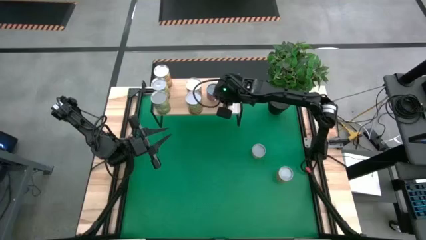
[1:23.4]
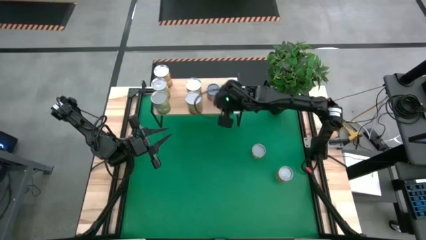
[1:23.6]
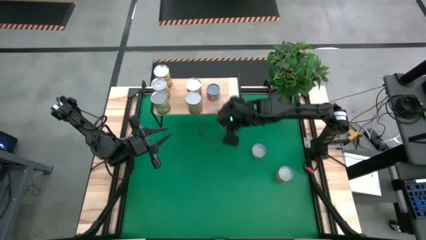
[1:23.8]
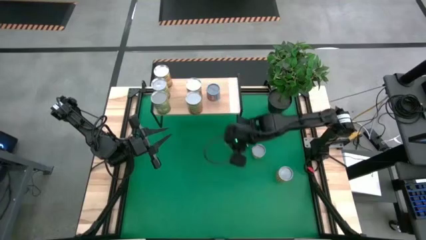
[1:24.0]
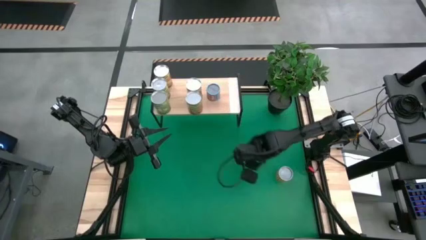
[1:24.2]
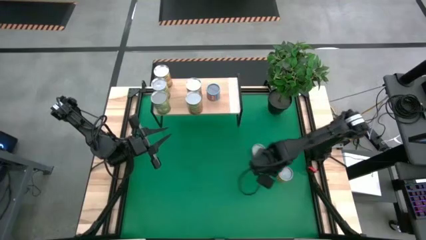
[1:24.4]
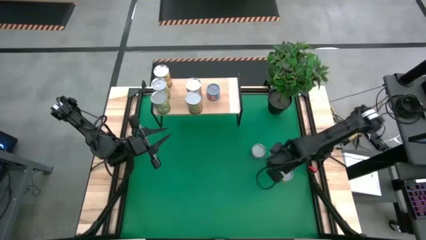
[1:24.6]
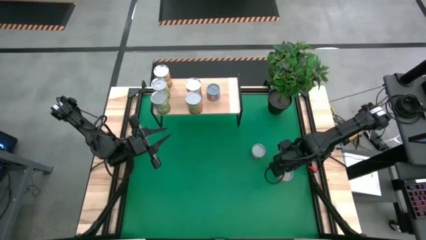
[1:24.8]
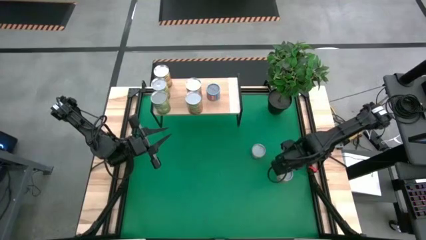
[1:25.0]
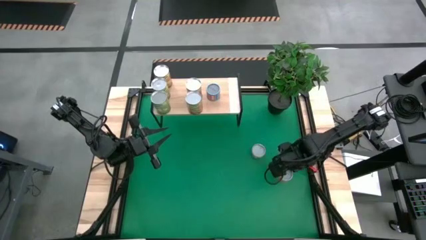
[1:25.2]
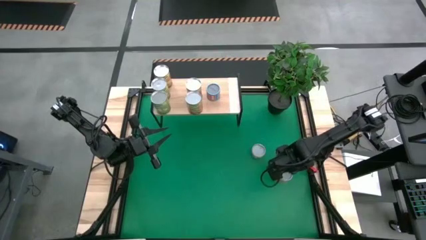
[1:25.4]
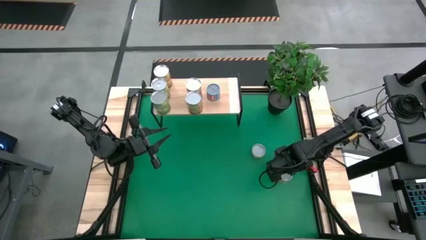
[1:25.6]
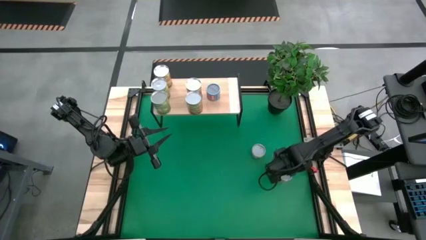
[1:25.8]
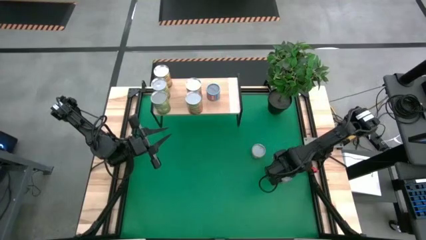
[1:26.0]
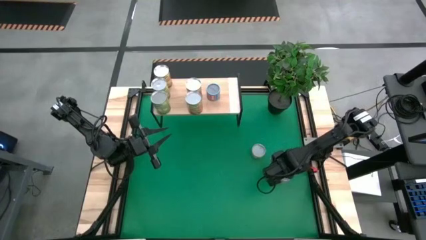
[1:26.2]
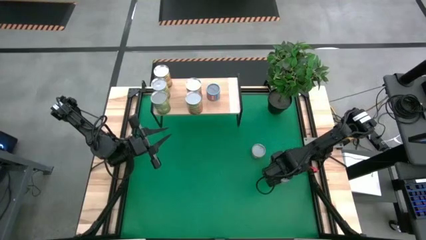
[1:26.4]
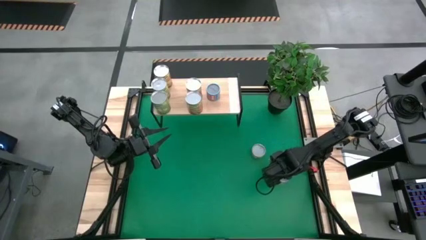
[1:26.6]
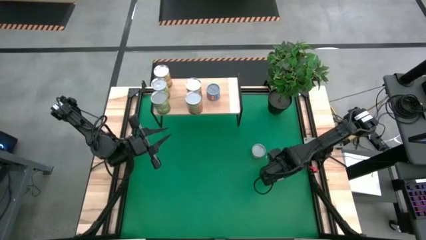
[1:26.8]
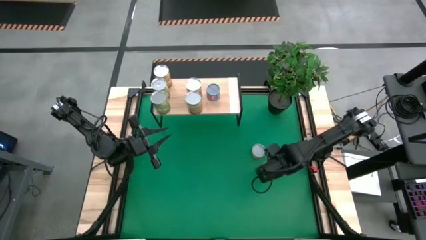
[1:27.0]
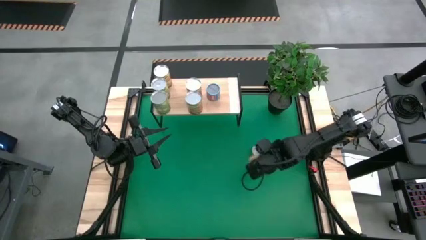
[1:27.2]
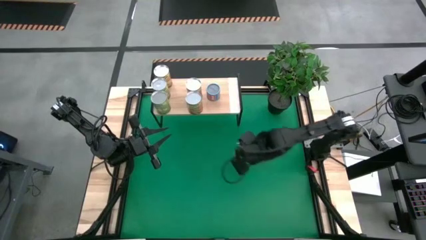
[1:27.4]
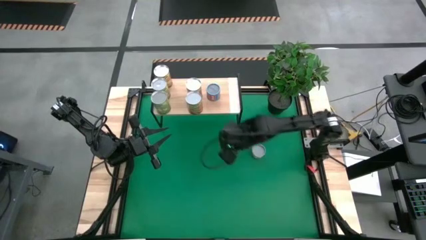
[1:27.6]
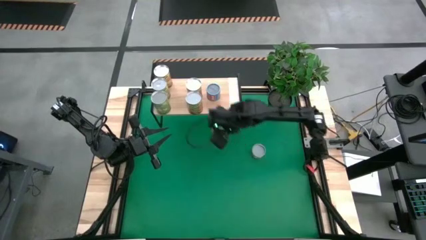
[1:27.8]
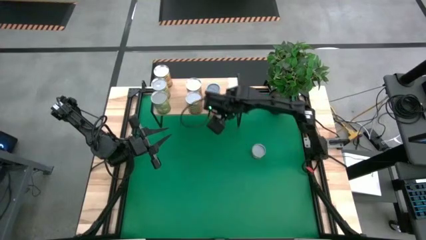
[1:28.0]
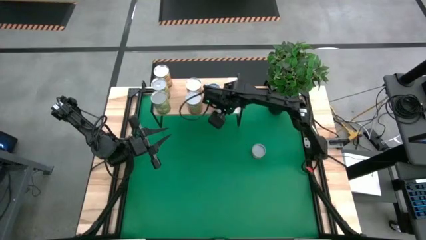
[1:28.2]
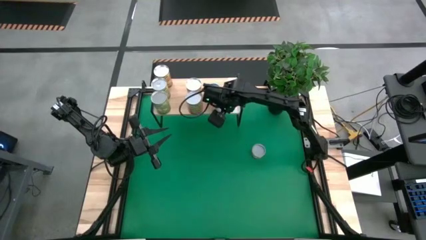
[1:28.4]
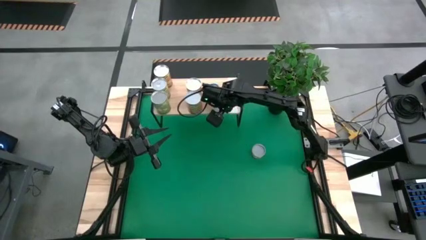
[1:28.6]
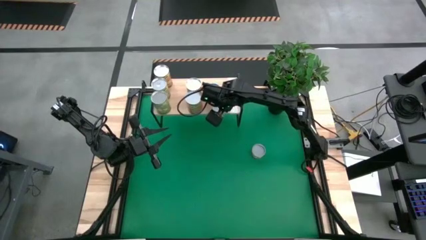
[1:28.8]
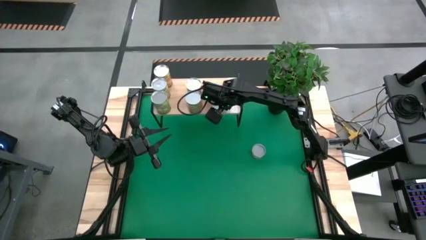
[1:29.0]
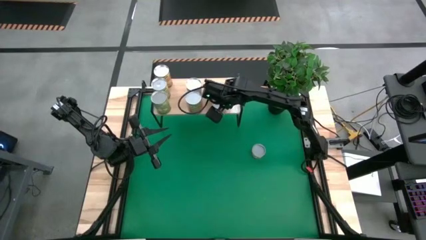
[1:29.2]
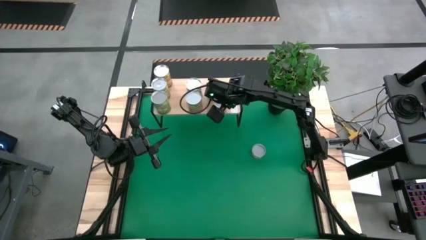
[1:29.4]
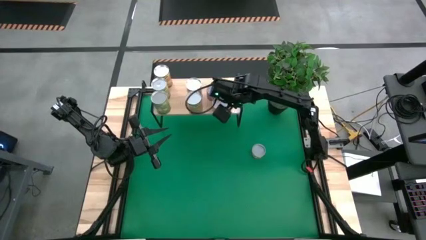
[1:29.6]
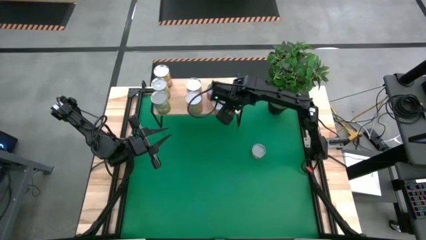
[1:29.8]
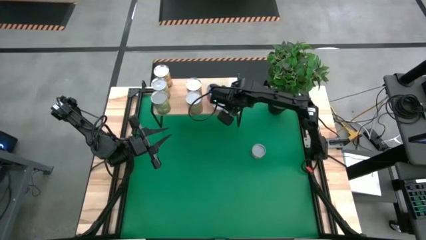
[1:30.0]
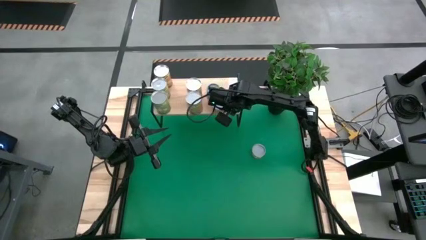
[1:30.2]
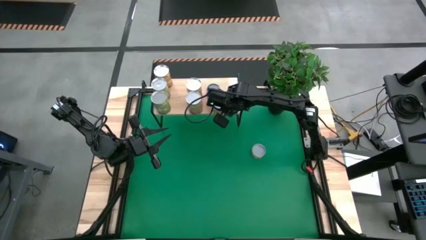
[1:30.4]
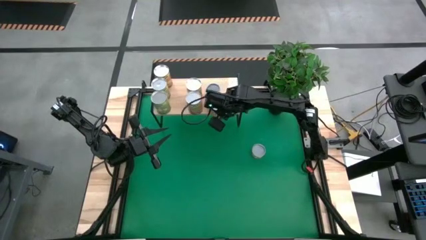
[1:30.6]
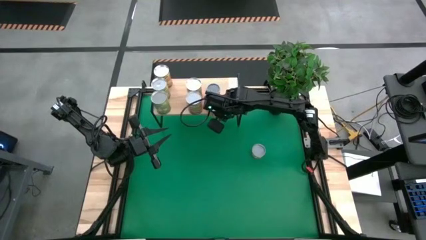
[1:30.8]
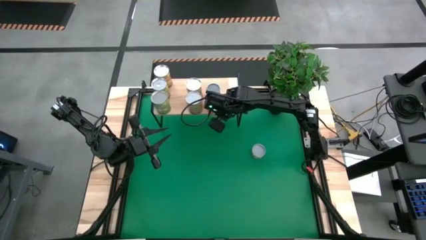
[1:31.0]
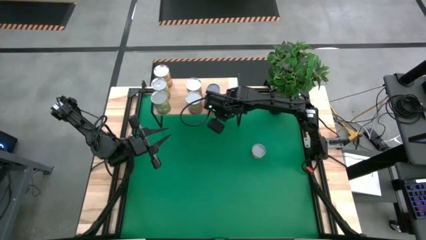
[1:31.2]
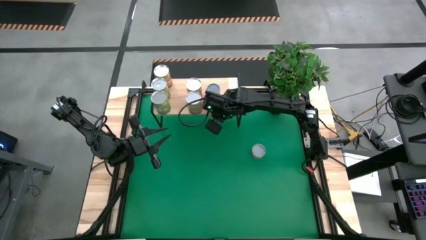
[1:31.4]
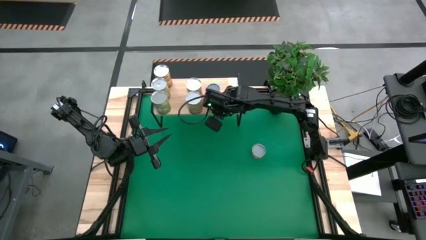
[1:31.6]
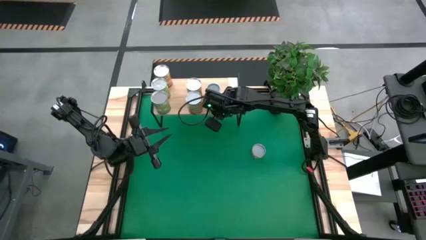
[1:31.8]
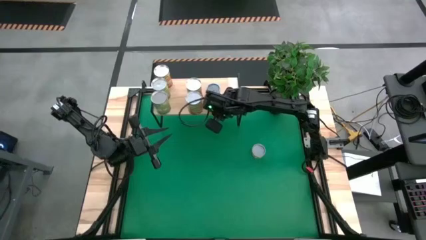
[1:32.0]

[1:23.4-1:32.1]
Task: Pick and place cans onto a shelf
Put the black bean can on the shelf

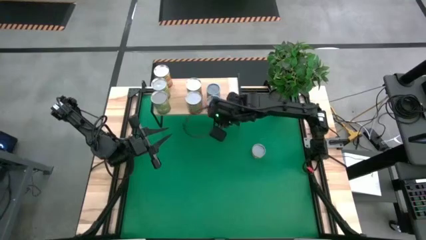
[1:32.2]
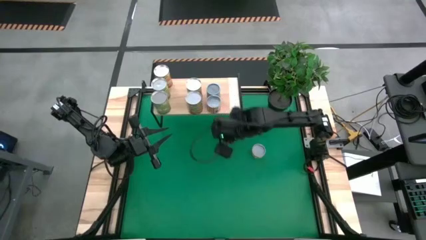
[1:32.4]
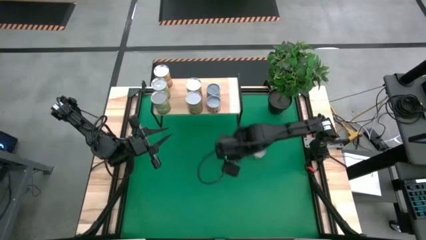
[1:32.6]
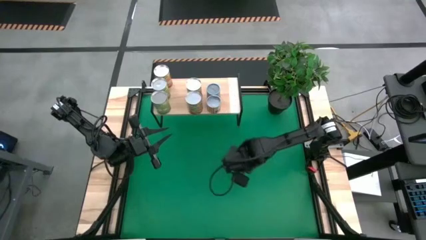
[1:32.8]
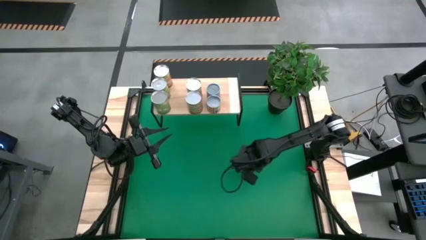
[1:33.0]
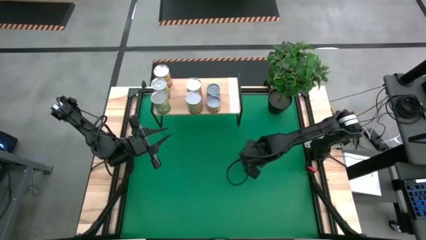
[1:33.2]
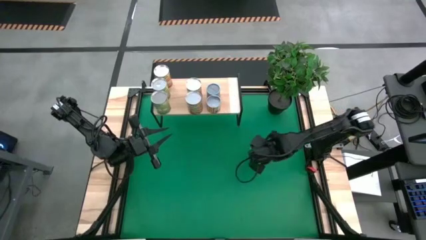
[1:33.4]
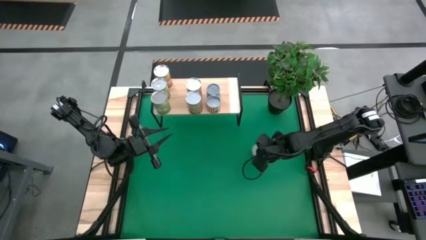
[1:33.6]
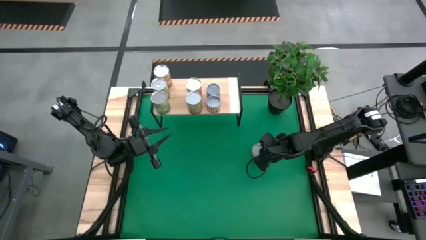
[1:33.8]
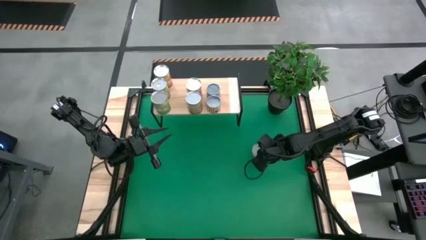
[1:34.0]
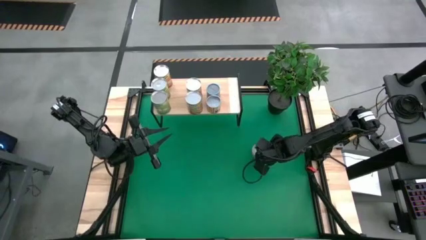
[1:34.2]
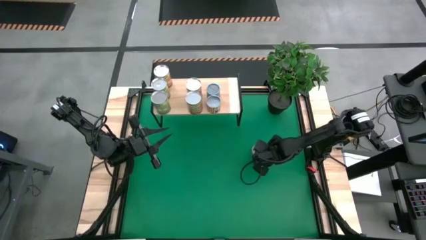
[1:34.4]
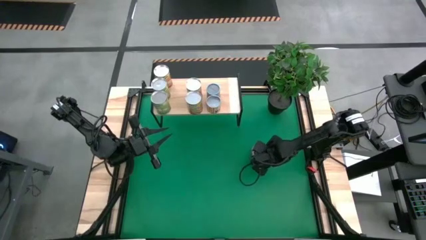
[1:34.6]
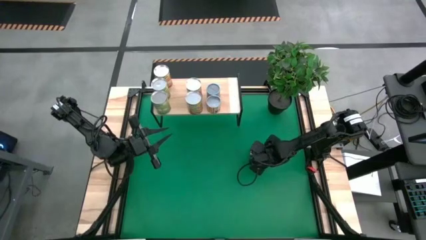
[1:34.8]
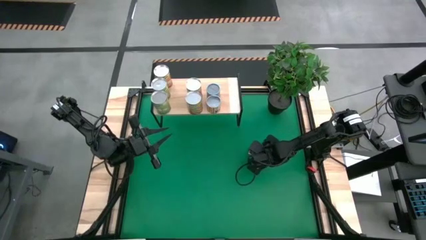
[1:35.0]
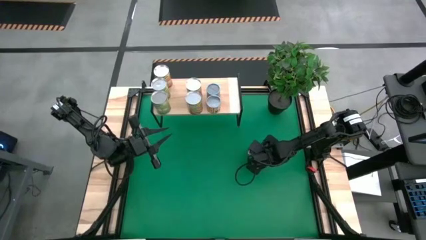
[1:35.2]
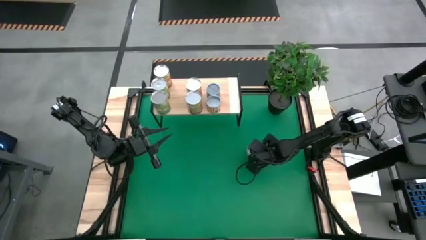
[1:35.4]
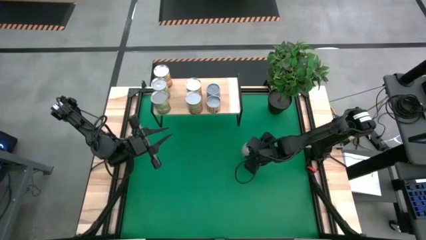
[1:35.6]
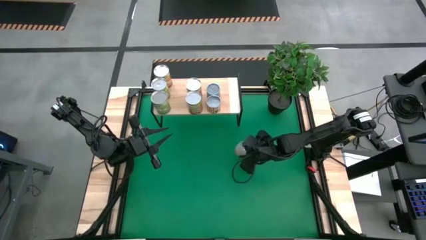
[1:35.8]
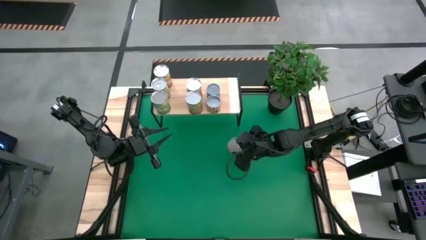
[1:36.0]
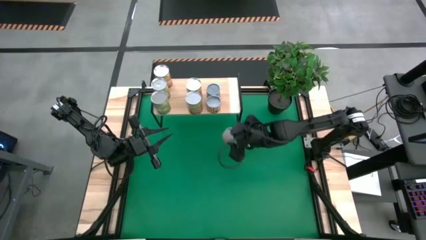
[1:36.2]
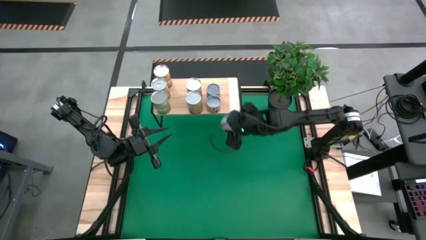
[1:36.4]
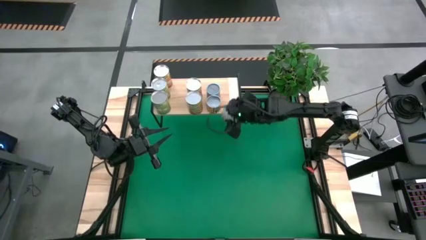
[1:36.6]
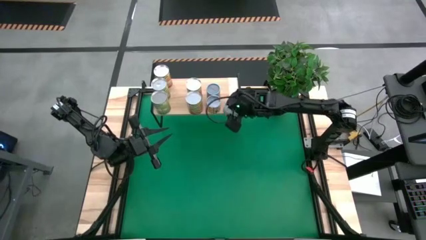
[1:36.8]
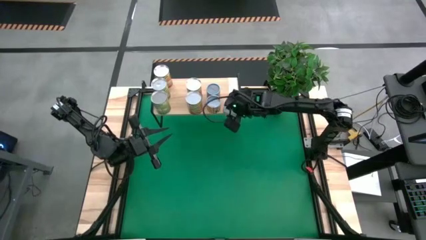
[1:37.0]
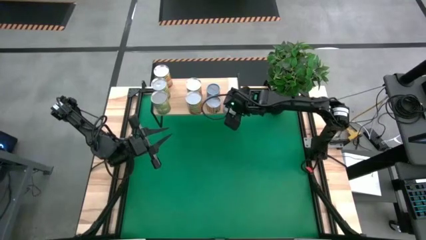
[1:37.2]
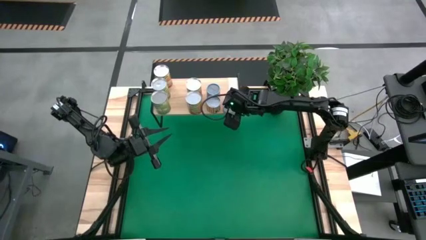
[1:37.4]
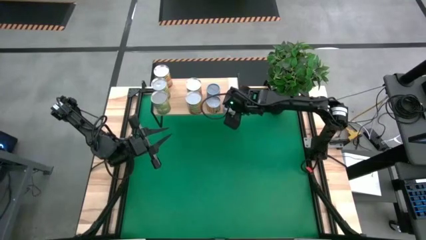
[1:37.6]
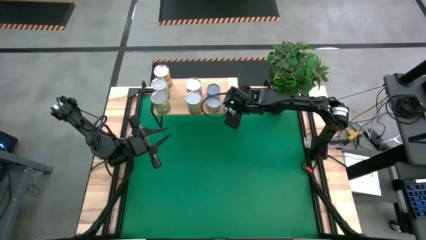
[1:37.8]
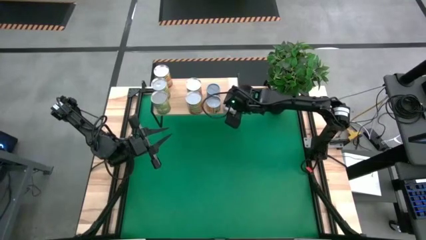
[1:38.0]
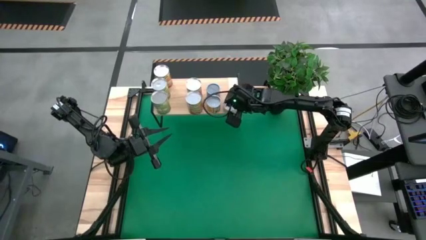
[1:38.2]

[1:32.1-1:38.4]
Put the mushroom can on the shelf

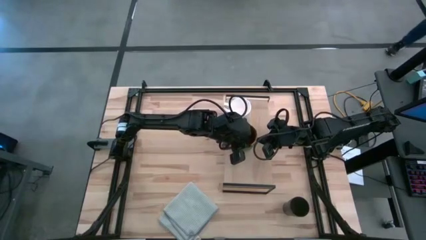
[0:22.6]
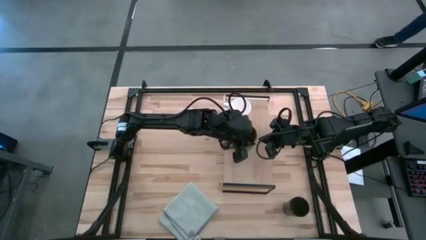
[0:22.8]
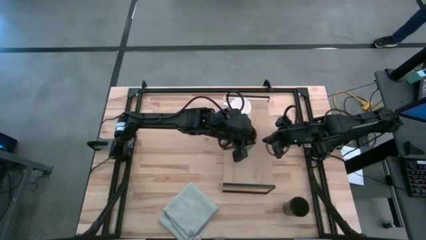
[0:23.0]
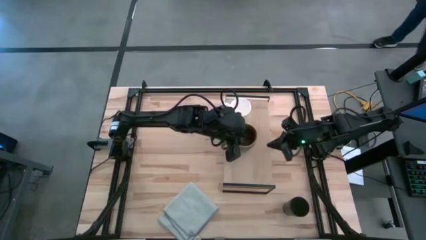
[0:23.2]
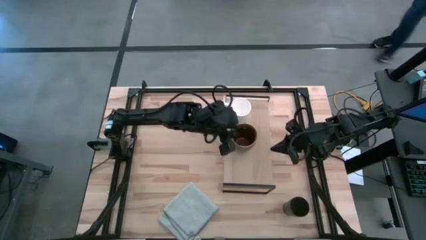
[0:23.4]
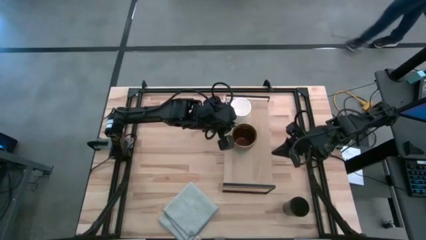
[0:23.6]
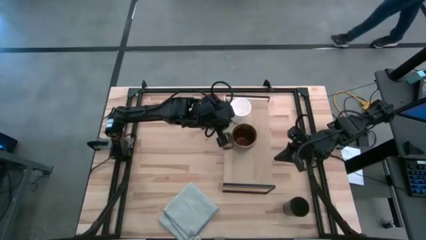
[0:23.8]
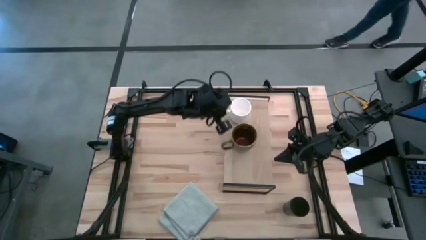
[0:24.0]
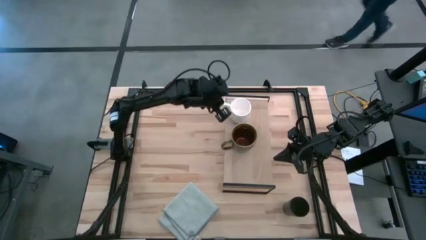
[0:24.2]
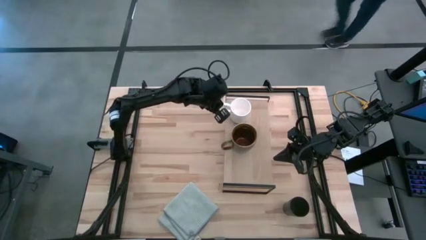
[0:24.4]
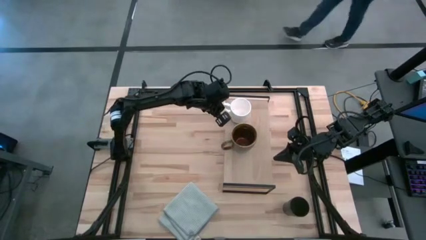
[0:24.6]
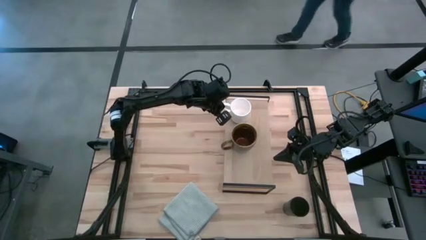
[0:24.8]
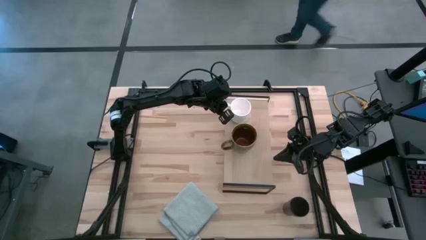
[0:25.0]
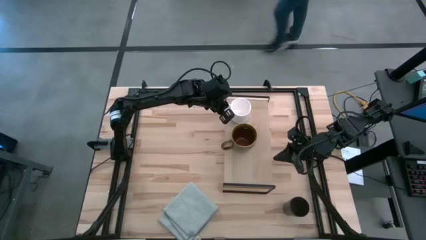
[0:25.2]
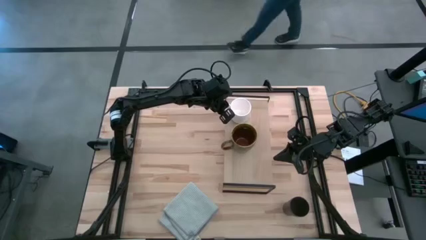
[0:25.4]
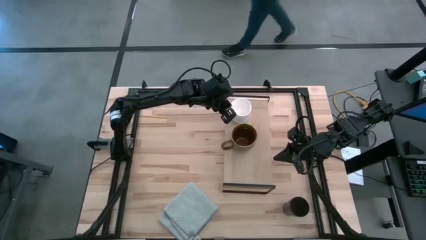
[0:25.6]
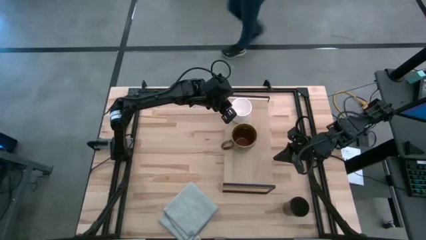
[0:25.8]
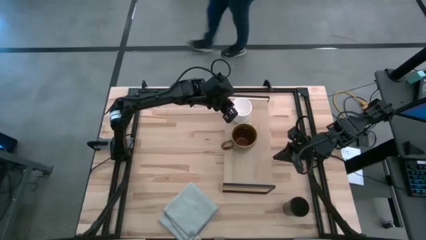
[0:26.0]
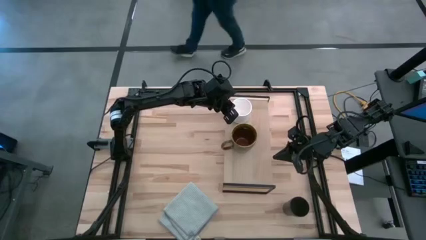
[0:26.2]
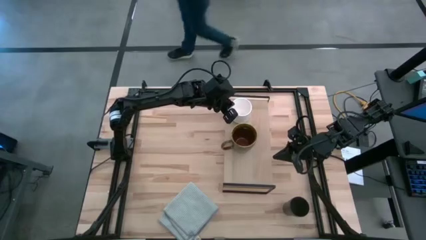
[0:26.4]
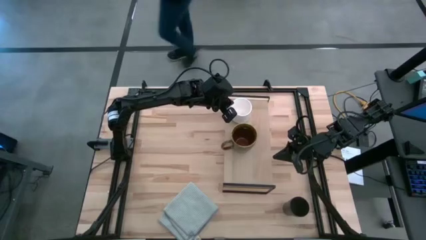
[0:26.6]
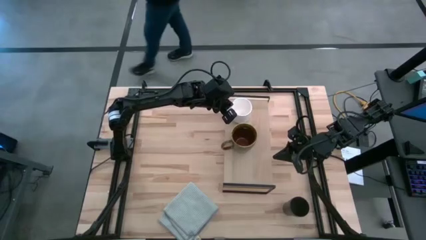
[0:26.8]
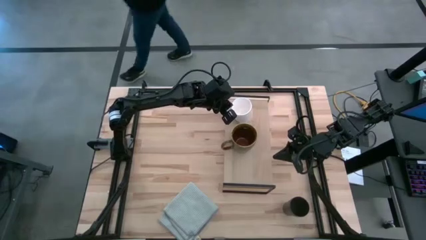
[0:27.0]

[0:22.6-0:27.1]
Task: Stack small to large cups/mugs on shelf
Adjust the white mug on the shelf
